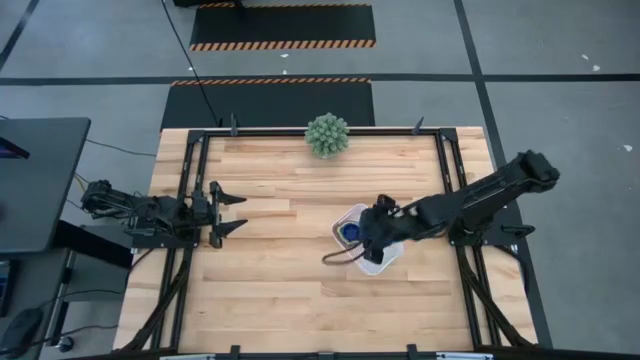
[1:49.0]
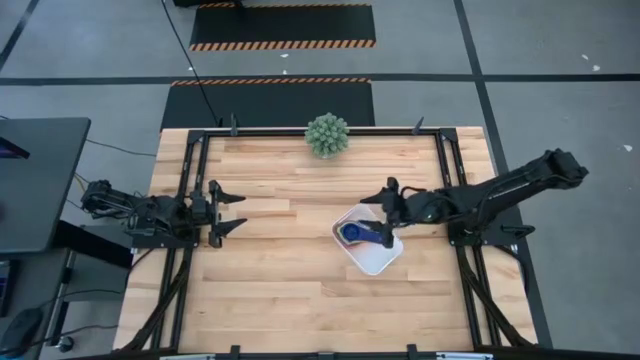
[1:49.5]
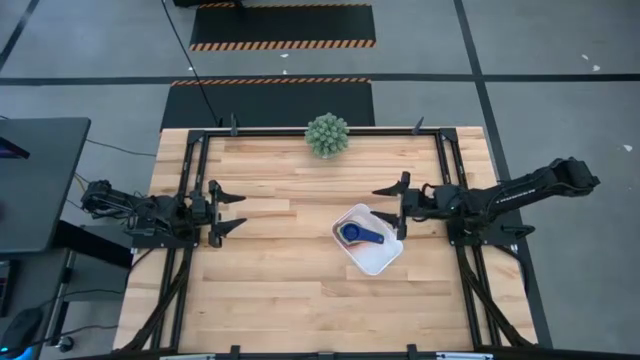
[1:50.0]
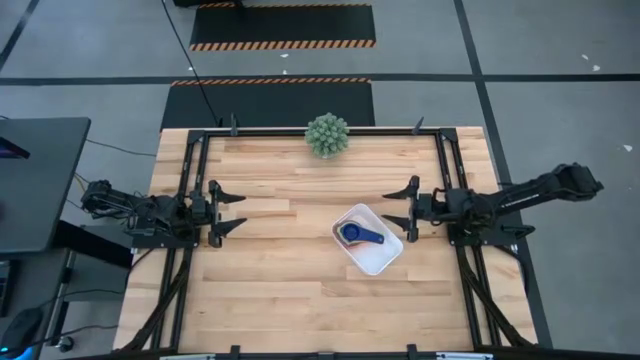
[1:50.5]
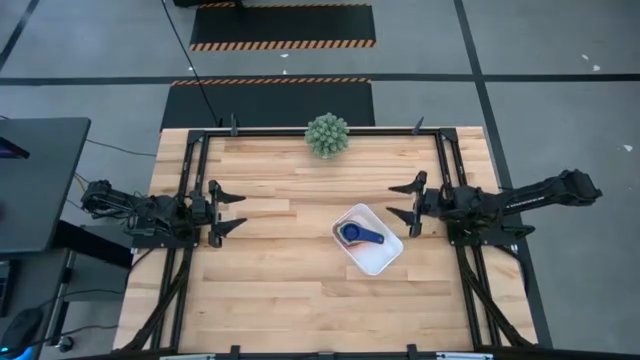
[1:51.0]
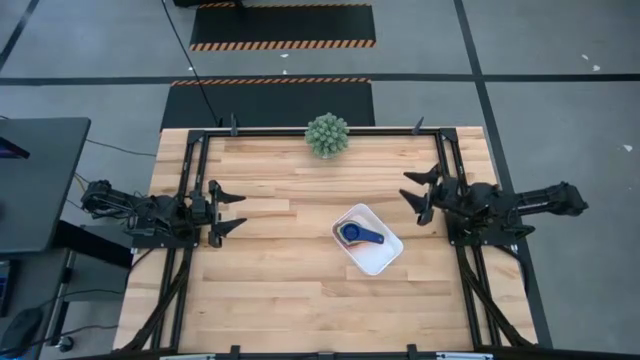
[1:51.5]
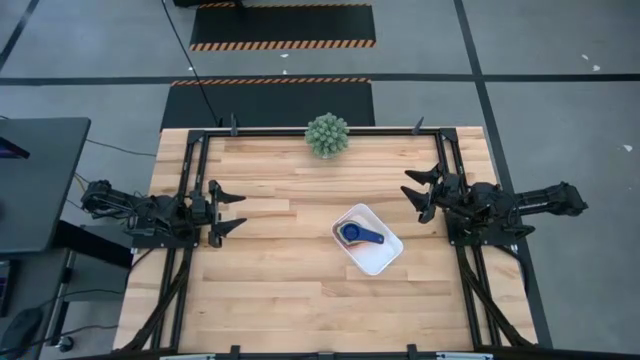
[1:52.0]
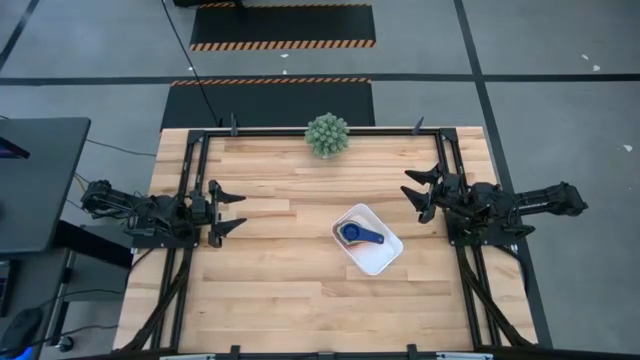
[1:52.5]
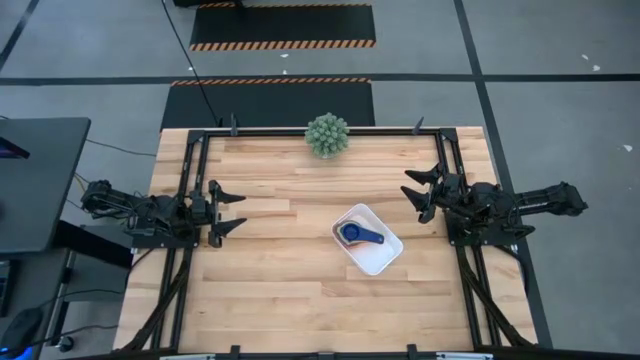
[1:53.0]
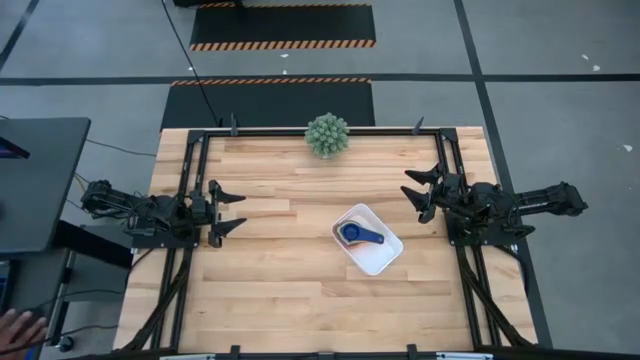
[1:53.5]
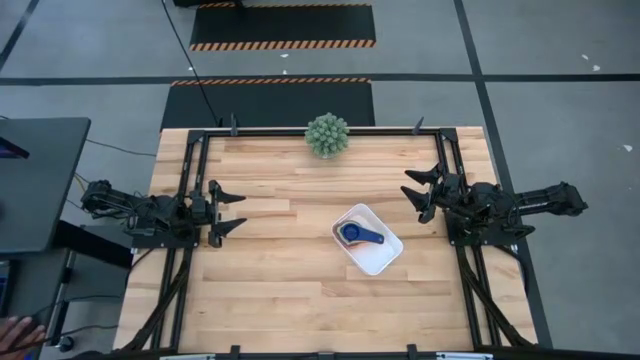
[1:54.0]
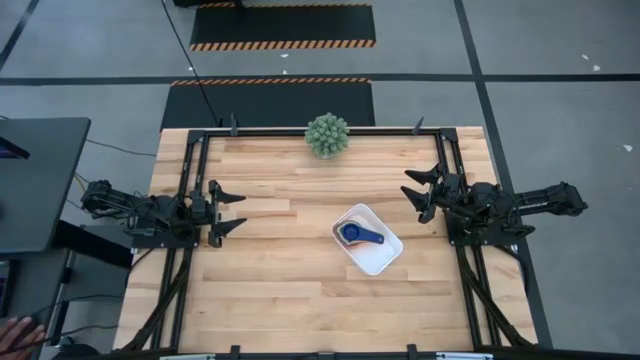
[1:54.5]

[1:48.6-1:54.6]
Task: Nest measuring cups in basket
Return to Home Position

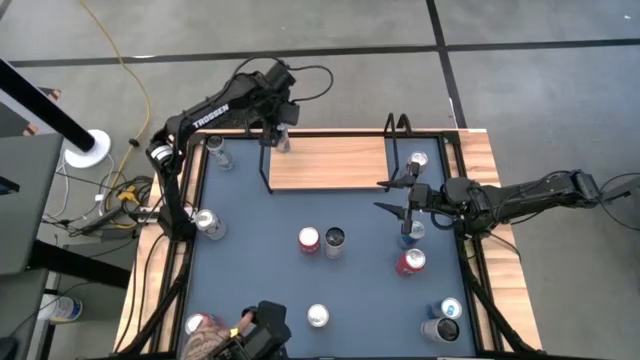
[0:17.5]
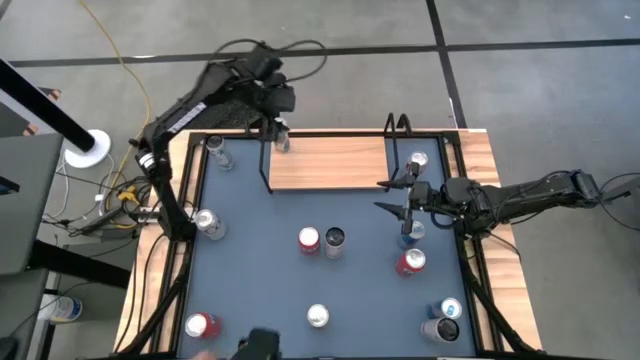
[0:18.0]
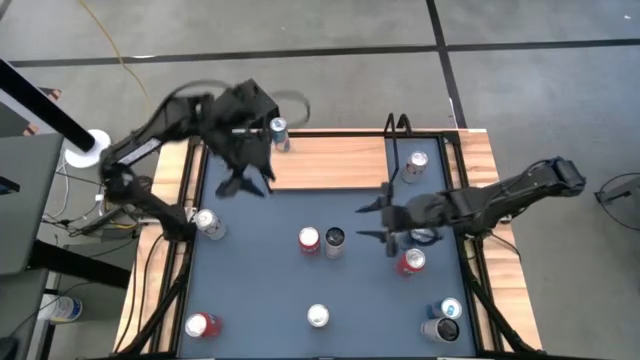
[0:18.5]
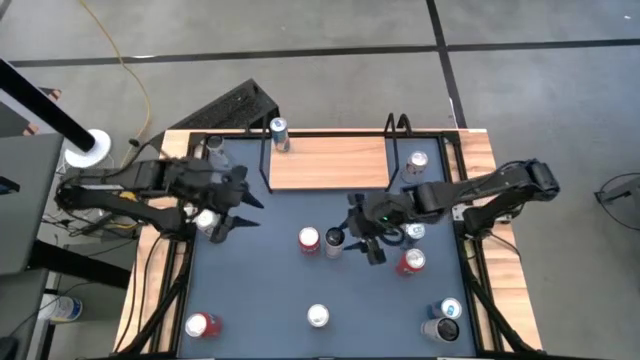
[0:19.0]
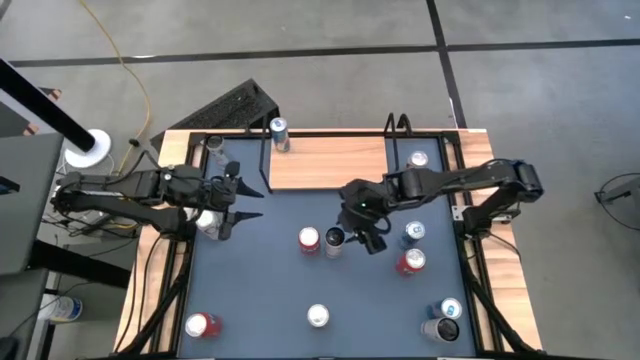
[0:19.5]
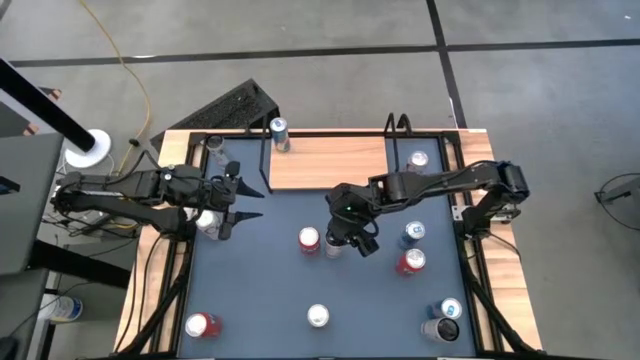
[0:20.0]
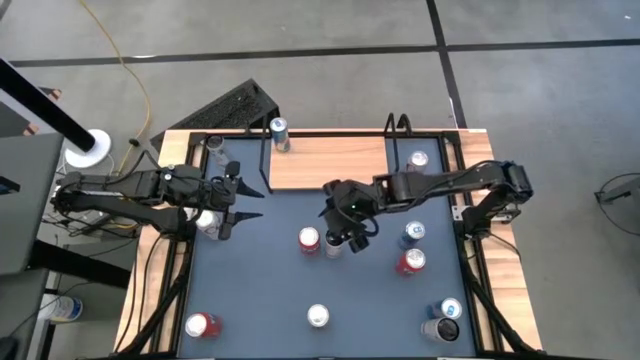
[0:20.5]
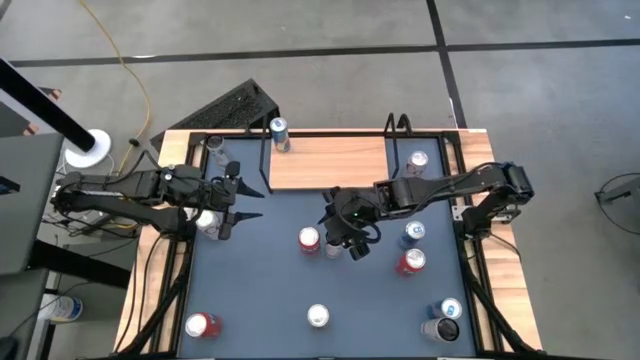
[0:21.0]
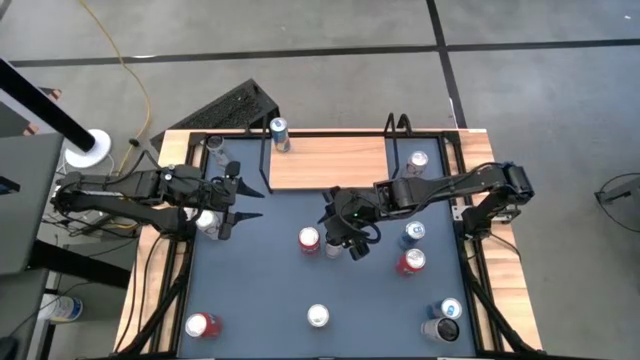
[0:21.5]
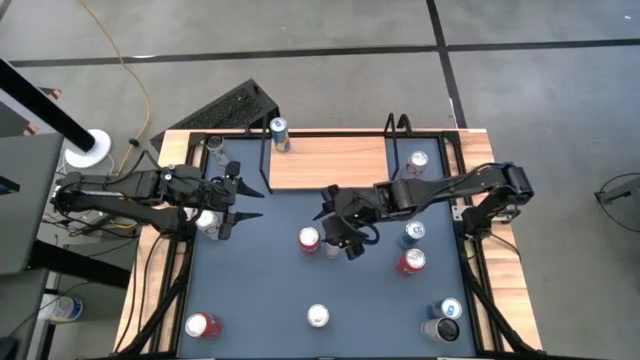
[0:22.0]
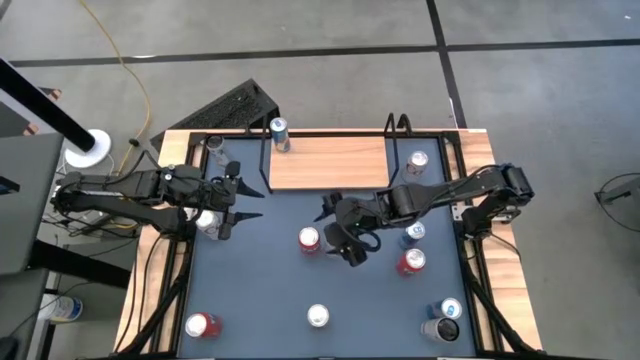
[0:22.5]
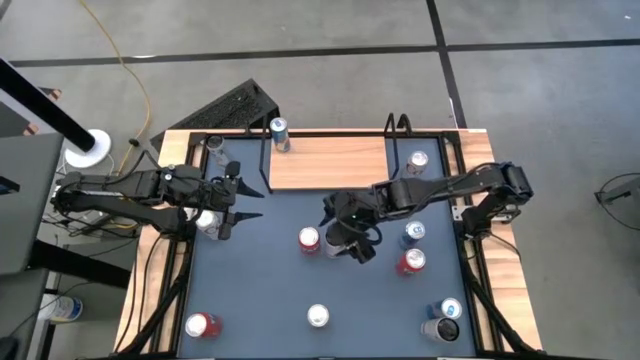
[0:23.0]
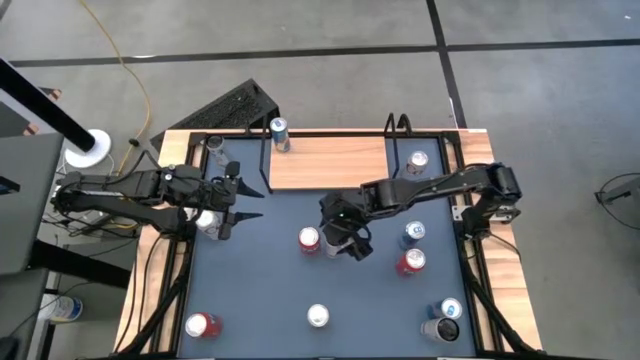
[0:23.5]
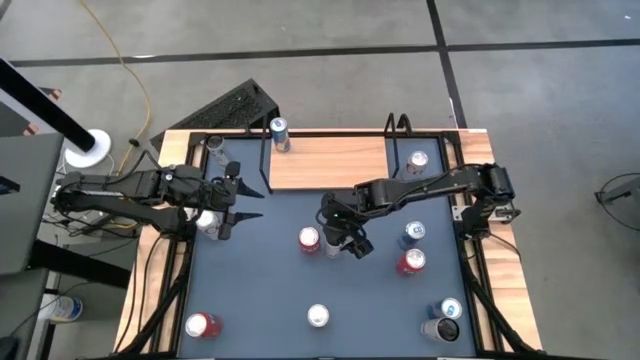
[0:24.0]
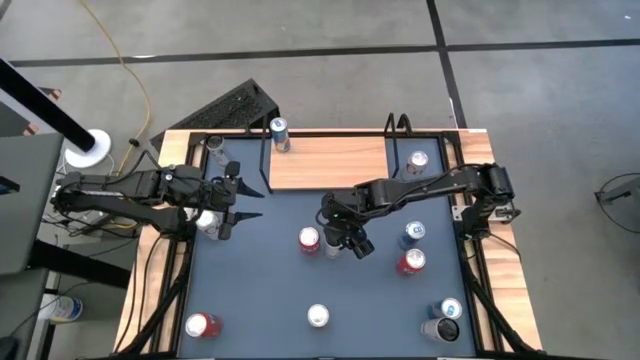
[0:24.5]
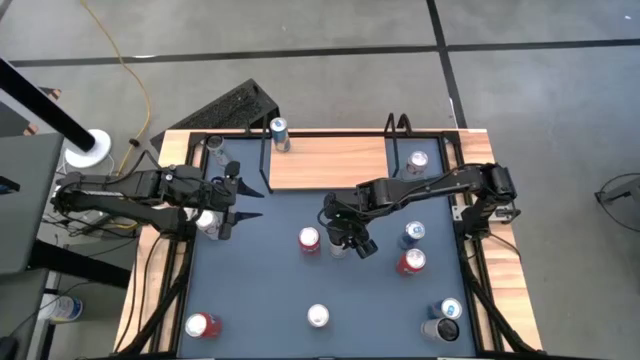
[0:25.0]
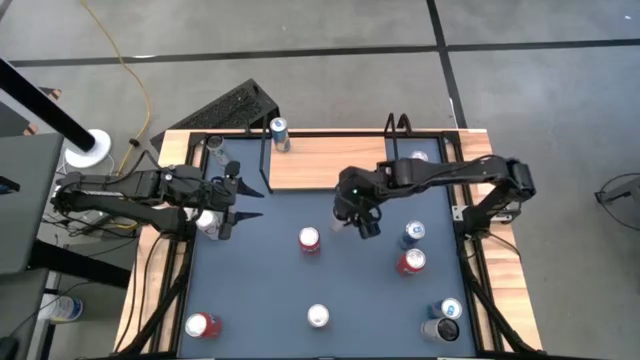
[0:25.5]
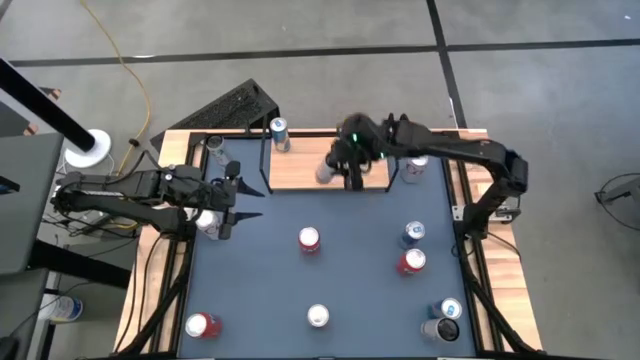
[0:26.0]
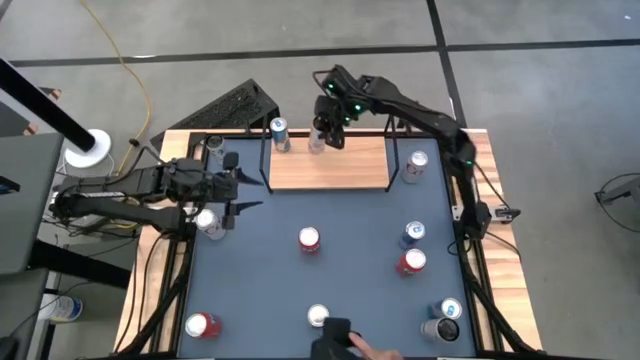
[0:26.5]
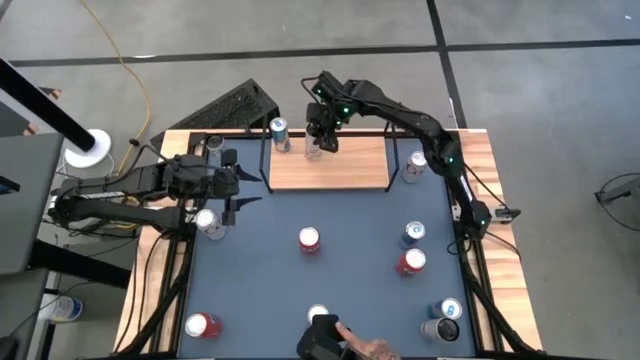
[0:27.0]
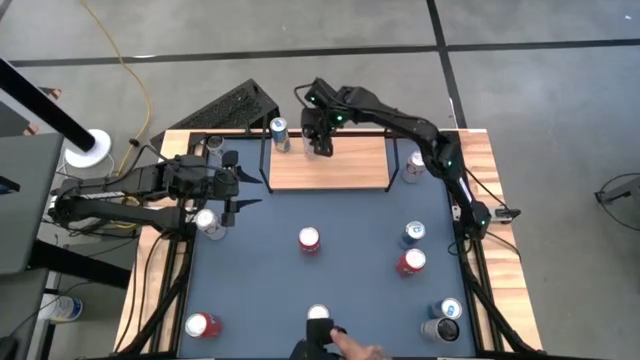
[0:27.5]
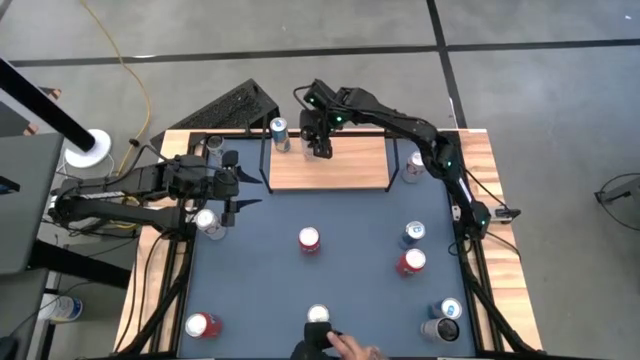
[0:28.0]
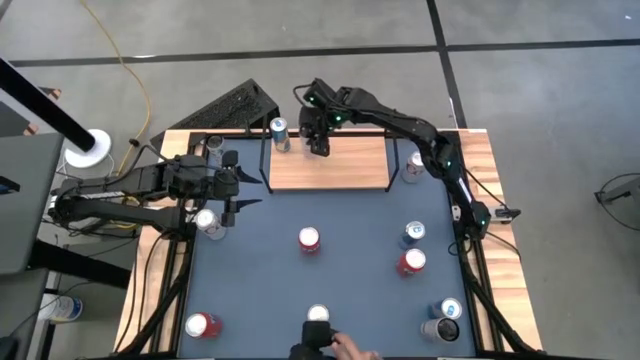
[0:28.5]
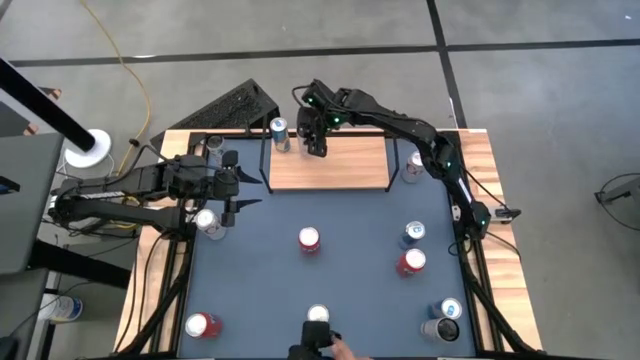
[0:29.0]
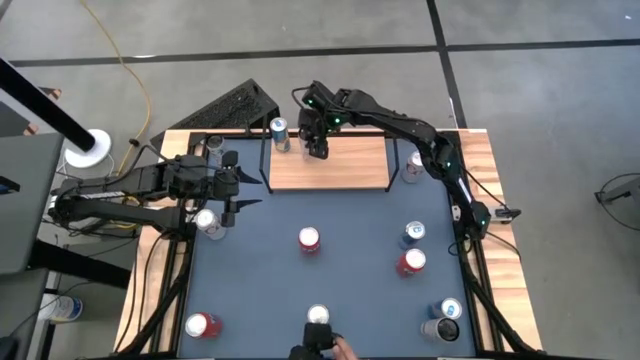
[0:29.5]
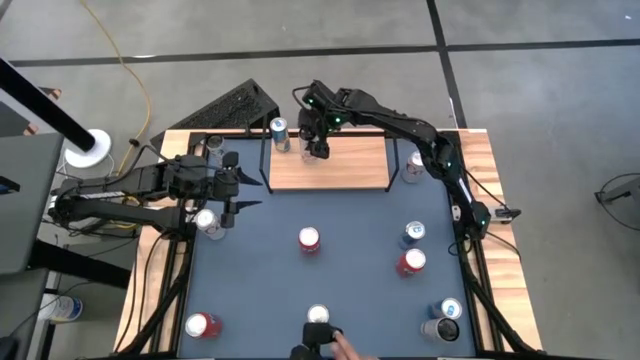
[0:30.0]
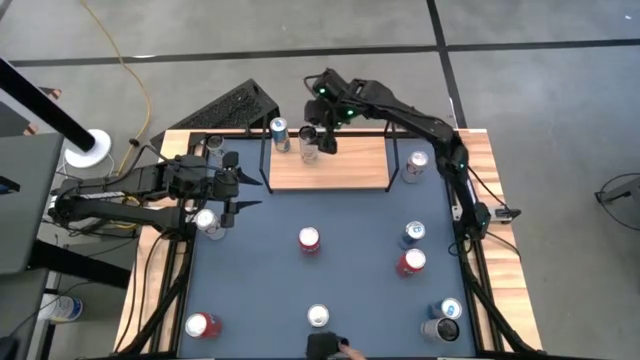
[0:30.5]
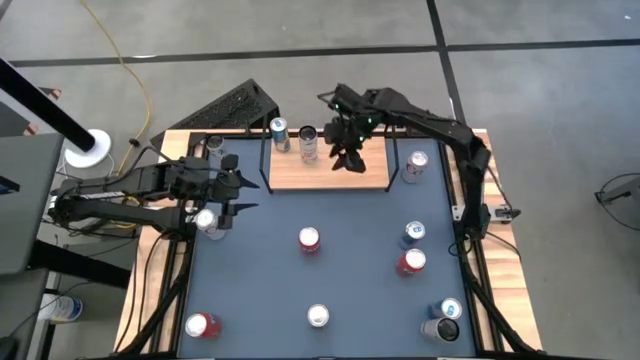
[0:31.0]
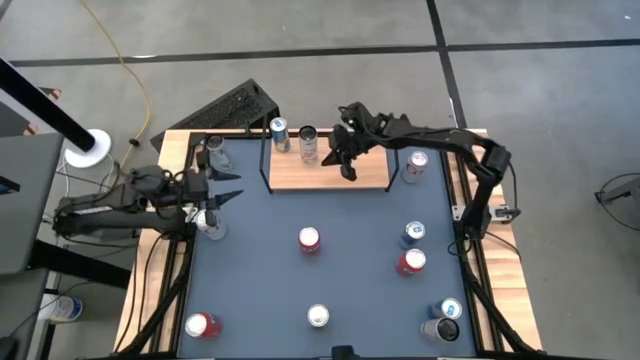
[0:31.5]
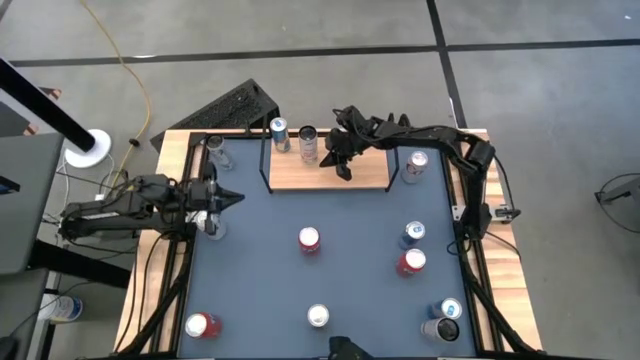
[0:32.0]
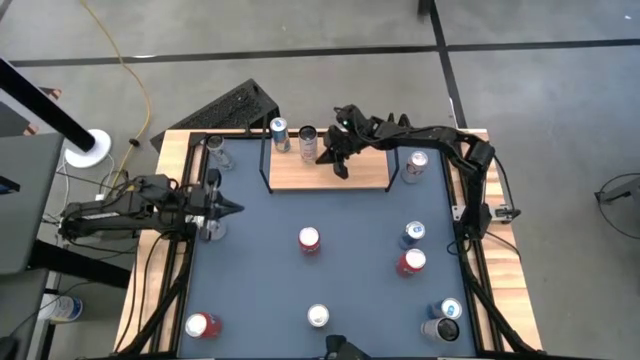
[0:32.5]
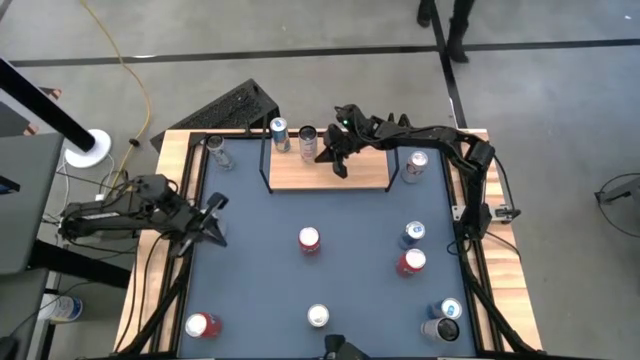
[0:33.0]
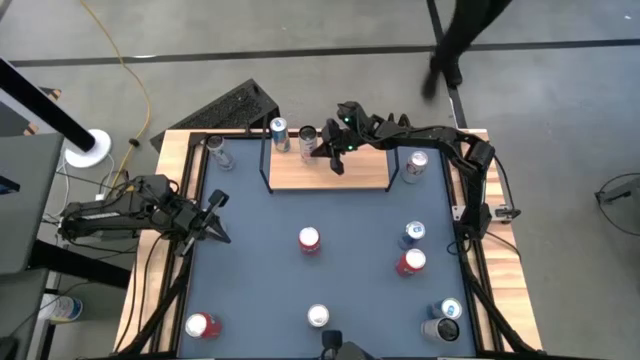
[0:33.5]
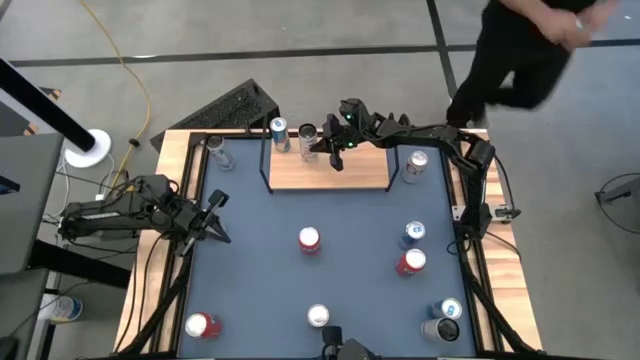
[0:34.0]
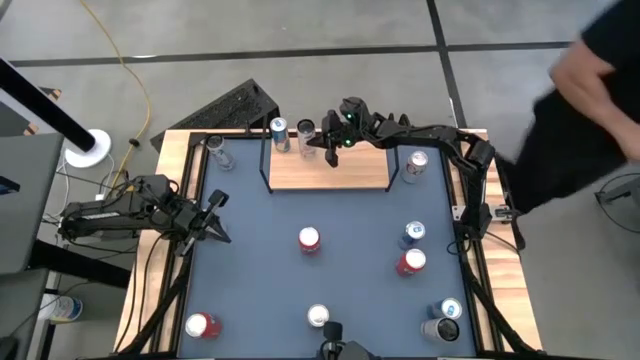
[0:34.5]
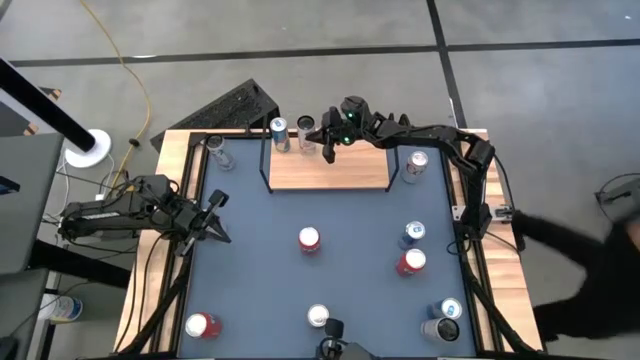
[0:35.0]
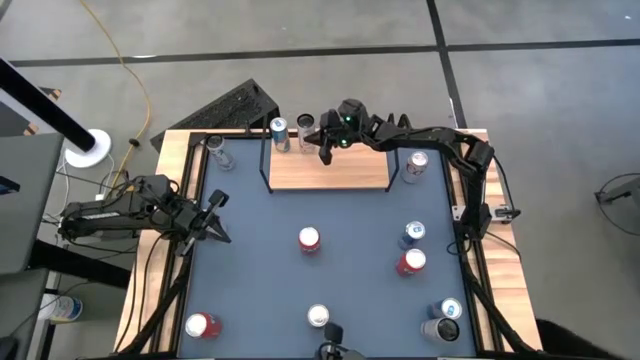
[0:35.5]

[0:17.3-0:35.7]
Task: Place canned beverage on shelf
Put the center pink and white soda can onto the shelf
